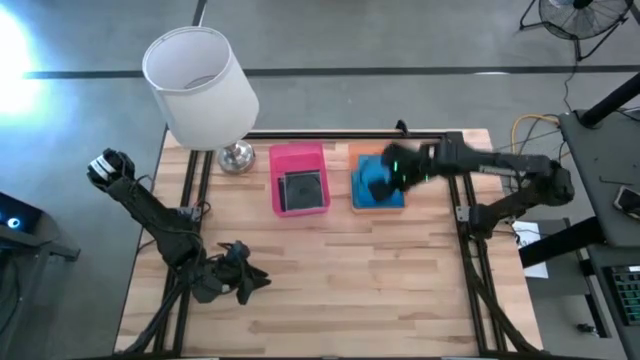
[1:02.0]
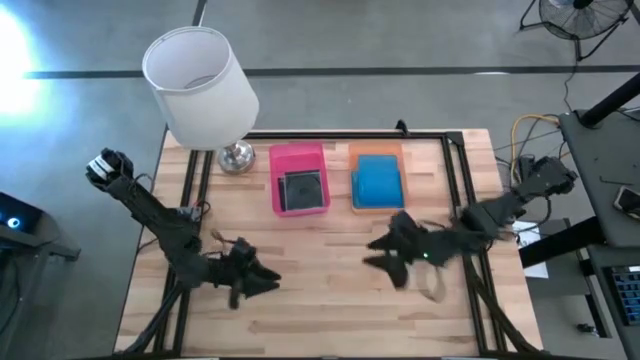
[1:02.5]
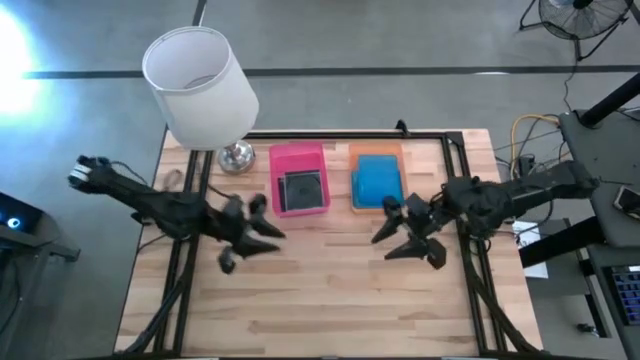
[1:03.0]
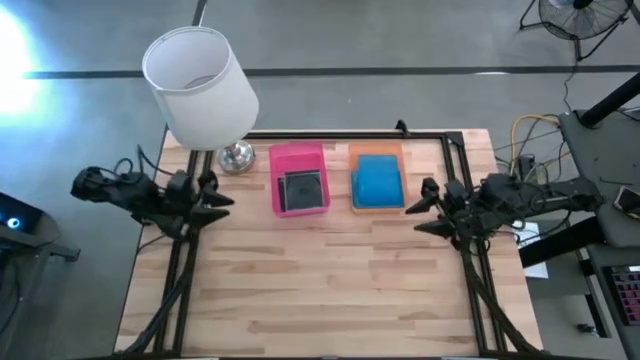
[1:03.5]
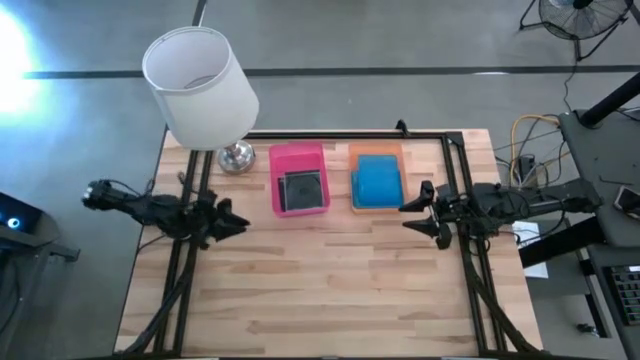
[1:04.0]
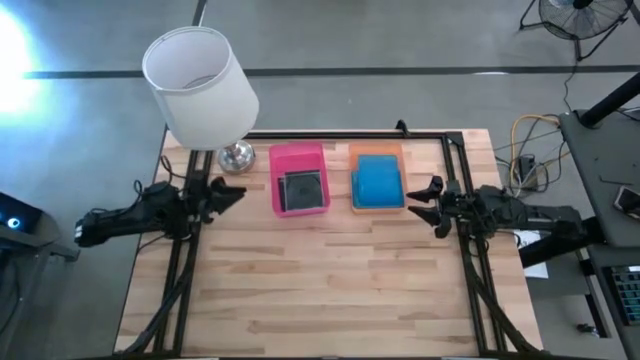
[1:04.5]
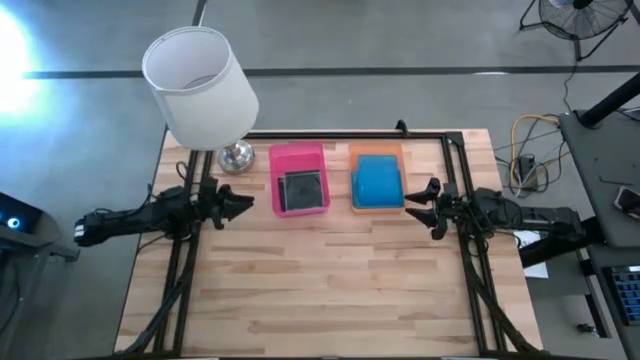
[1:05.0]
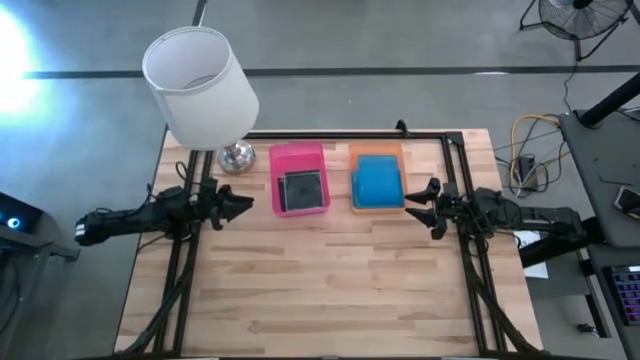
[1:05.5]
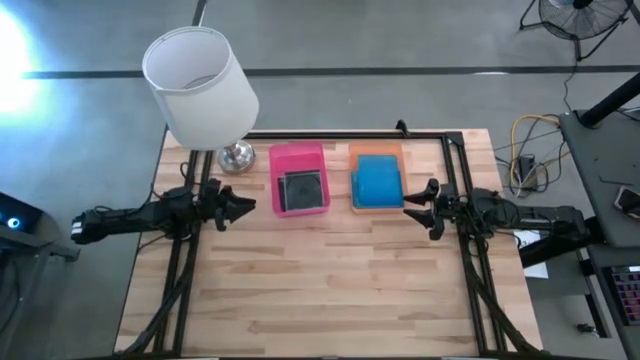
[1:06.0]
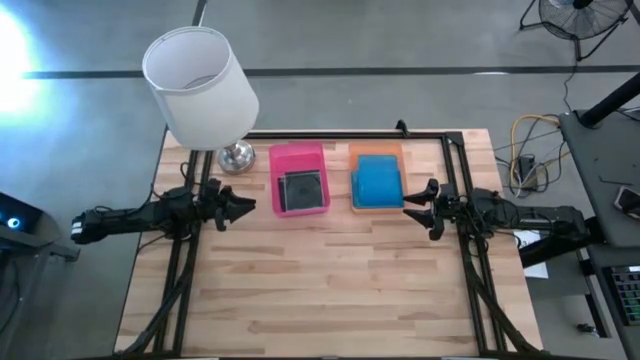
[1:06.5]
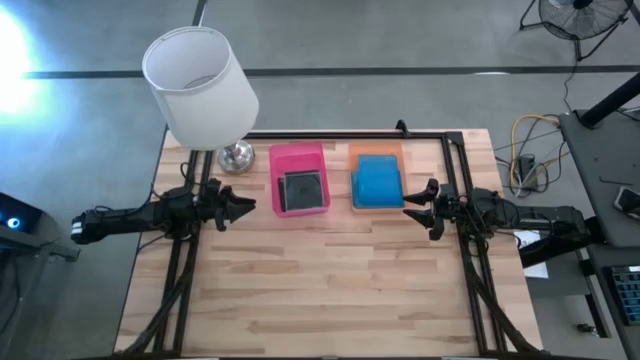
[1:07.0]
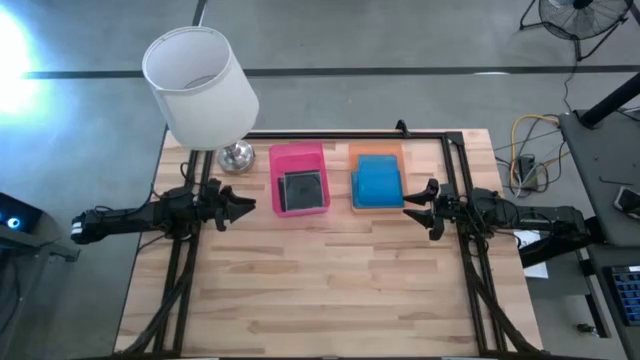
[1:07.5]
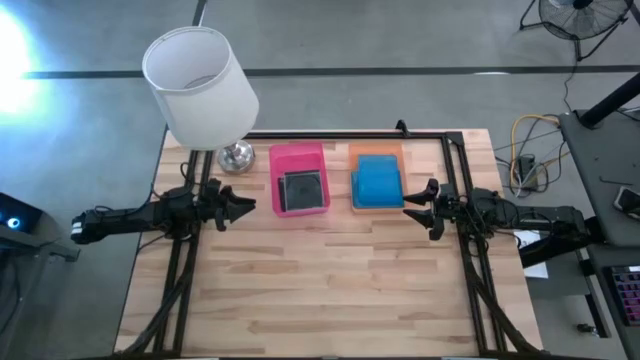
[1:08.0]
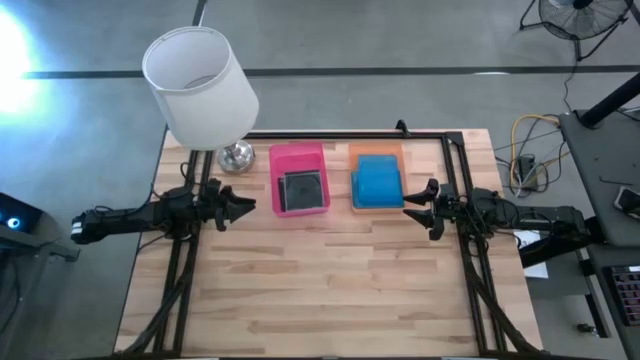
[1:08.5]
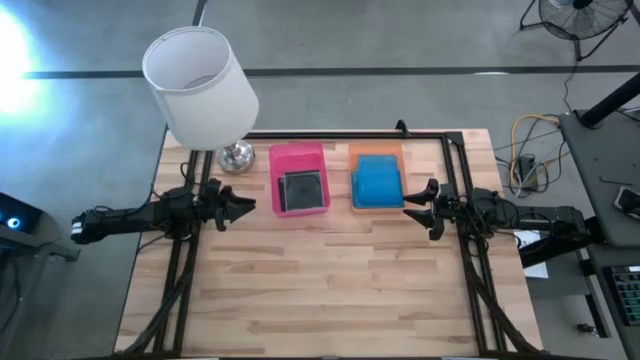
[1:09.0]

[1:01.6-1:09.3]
Task: Pick & place jewel cases by type
Return to home position

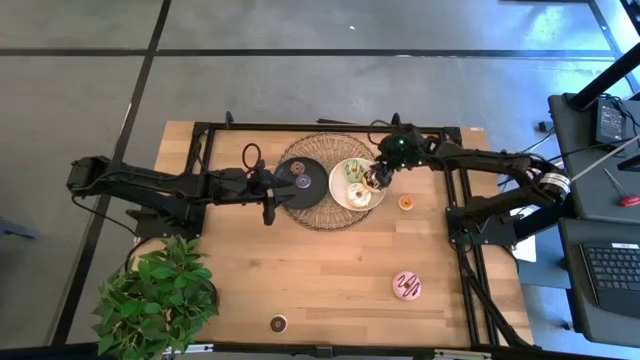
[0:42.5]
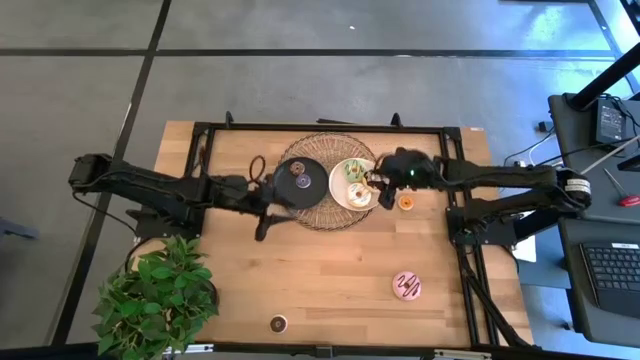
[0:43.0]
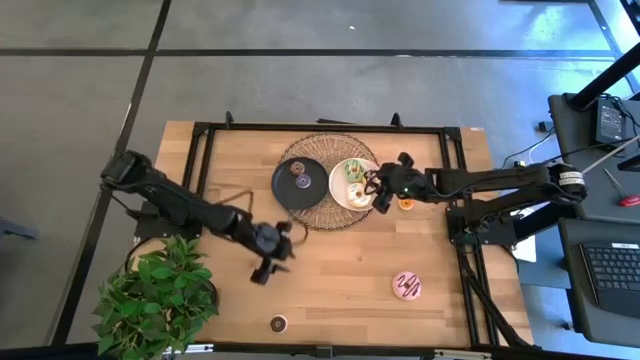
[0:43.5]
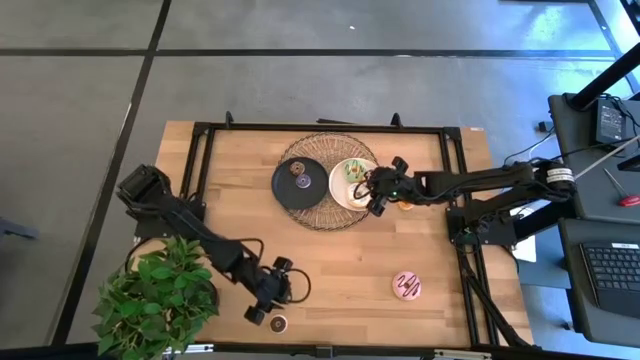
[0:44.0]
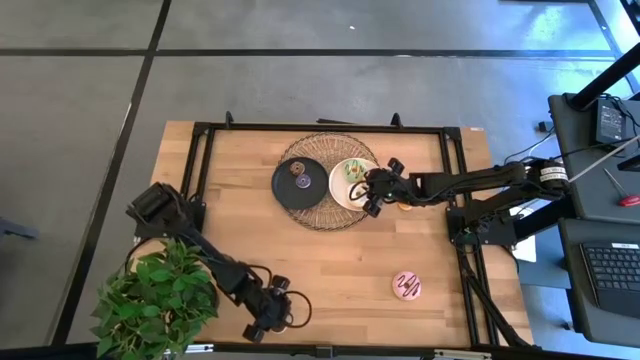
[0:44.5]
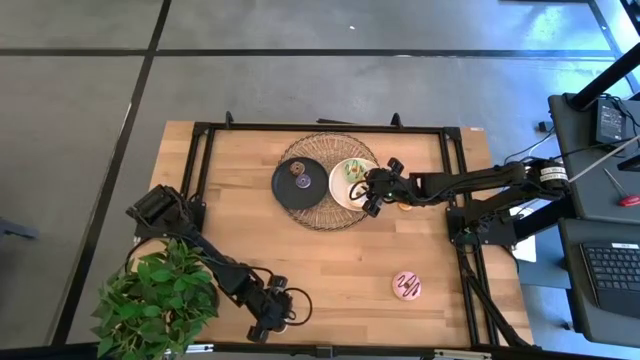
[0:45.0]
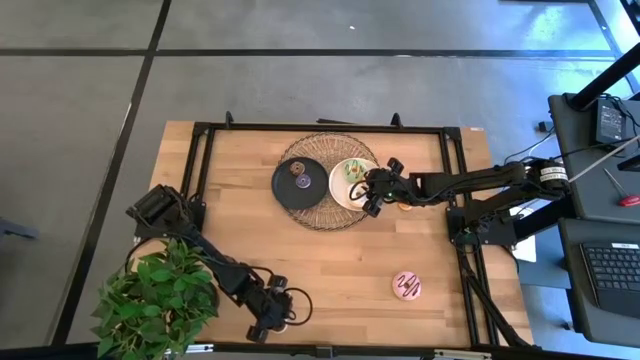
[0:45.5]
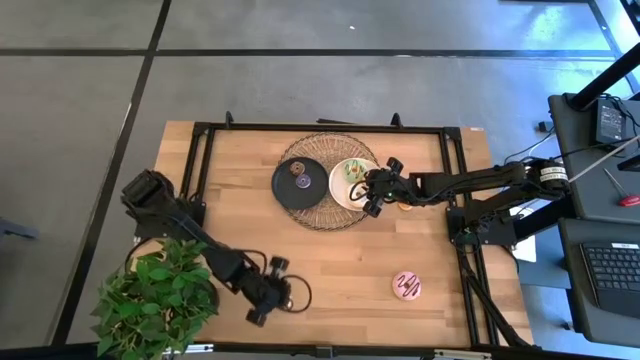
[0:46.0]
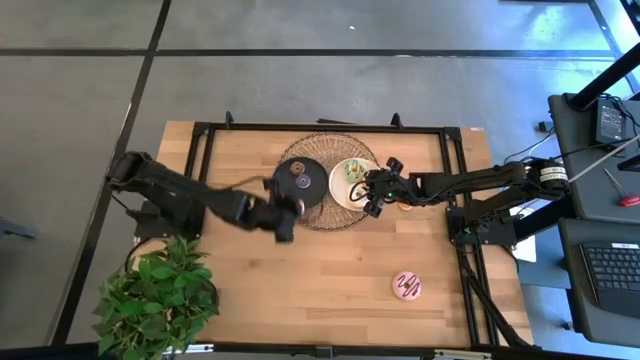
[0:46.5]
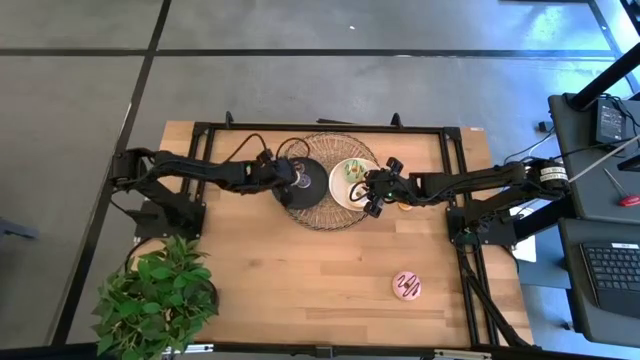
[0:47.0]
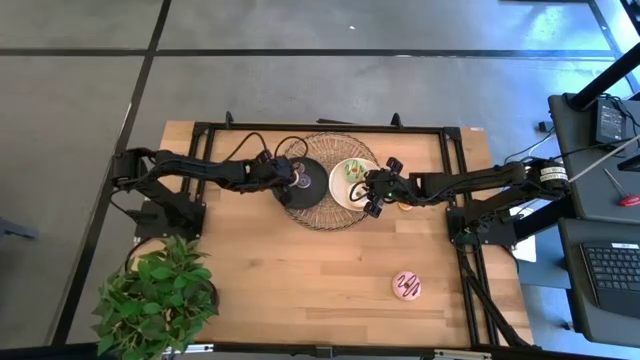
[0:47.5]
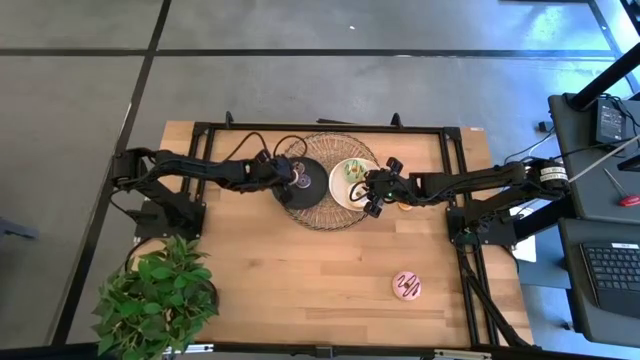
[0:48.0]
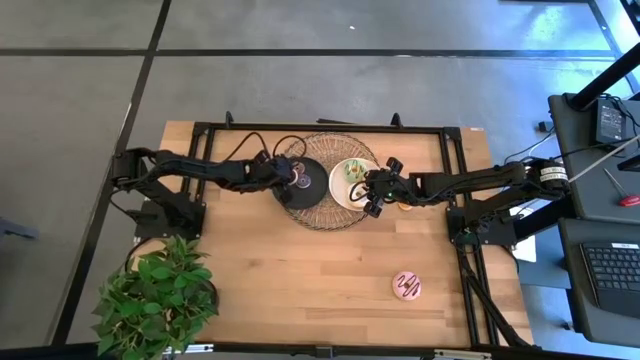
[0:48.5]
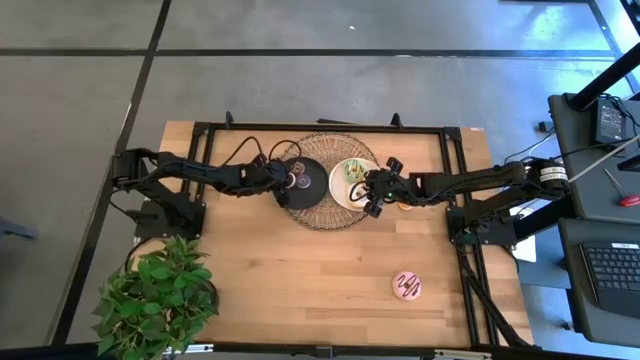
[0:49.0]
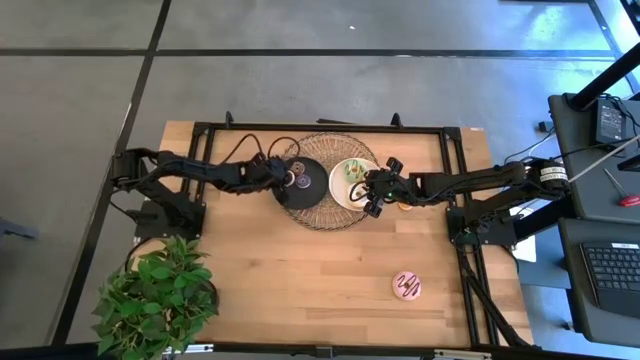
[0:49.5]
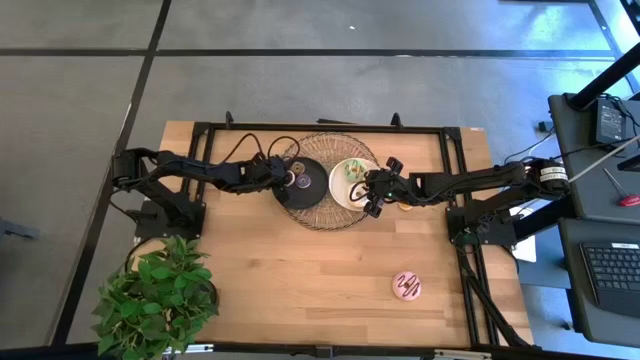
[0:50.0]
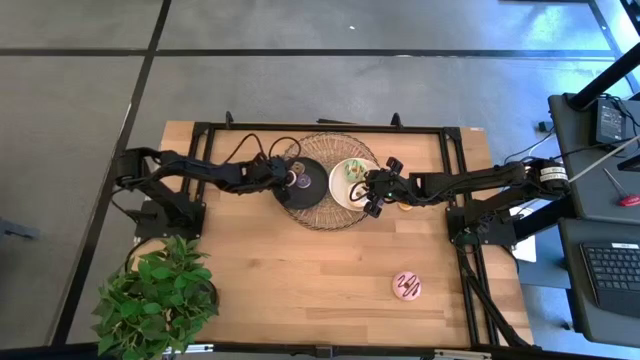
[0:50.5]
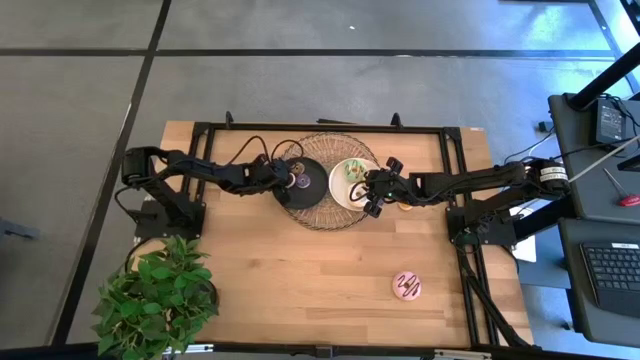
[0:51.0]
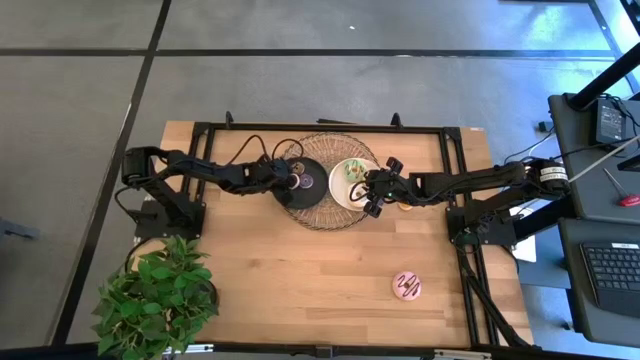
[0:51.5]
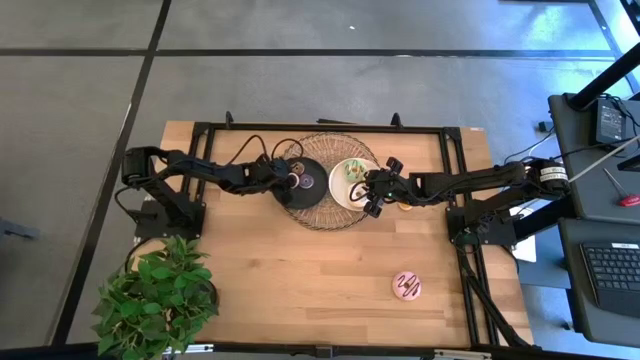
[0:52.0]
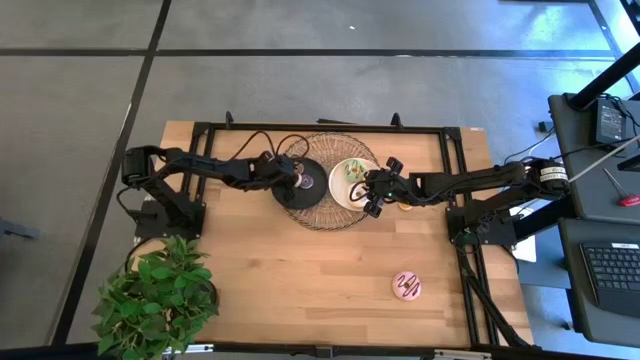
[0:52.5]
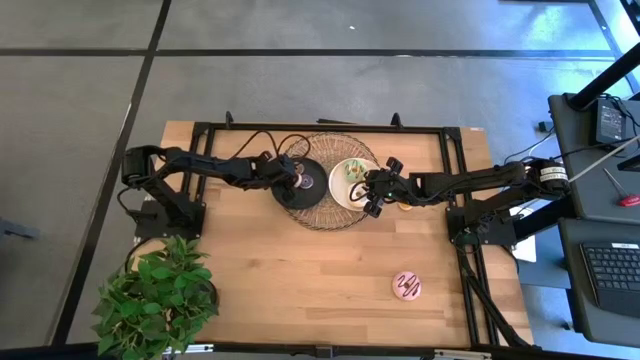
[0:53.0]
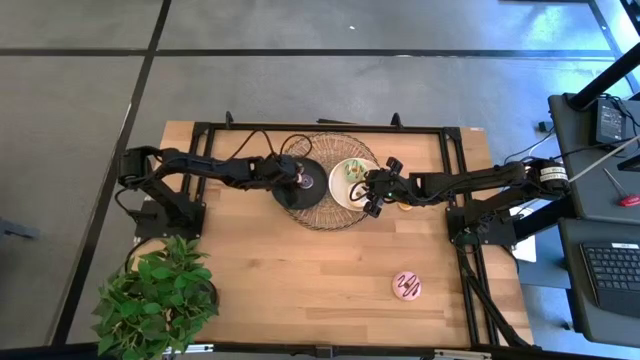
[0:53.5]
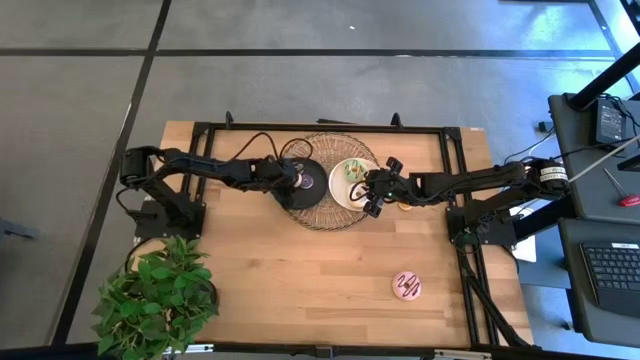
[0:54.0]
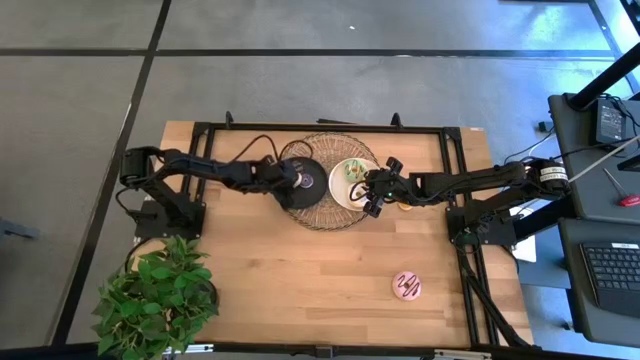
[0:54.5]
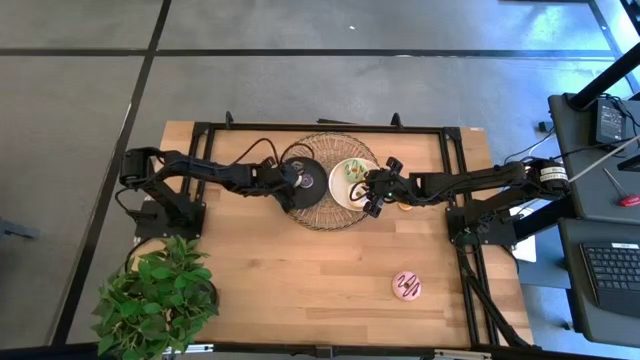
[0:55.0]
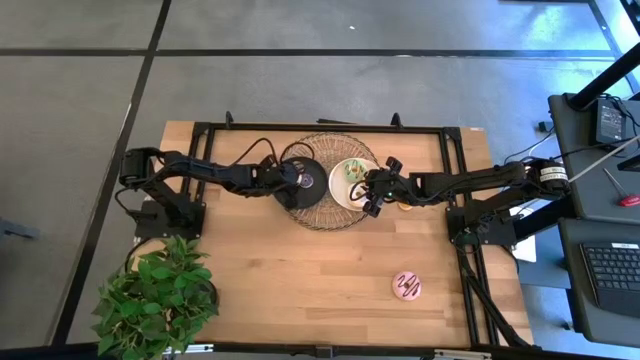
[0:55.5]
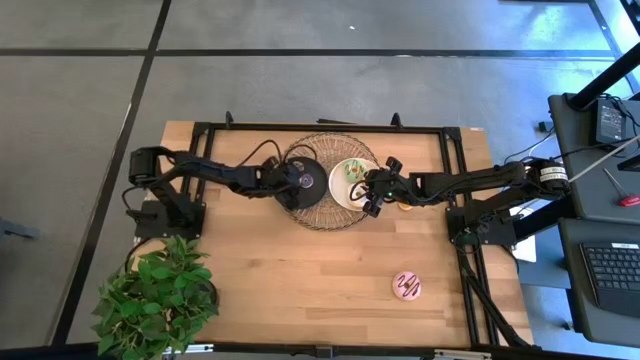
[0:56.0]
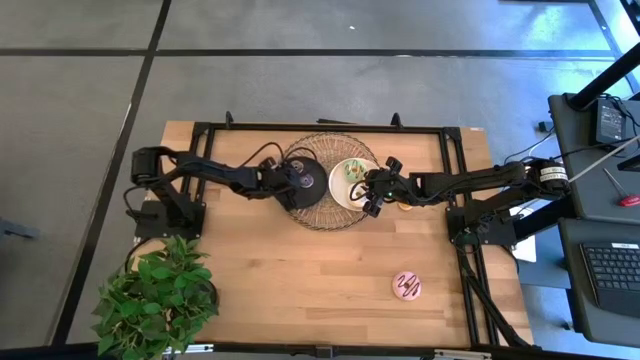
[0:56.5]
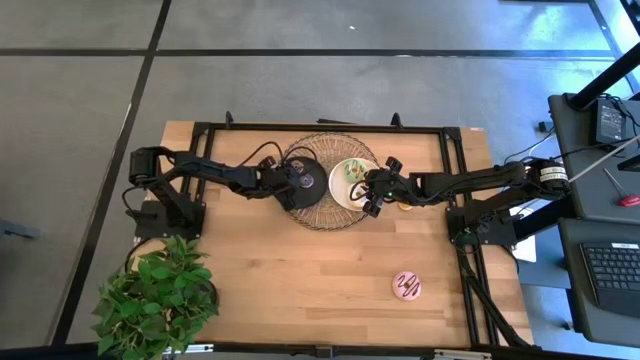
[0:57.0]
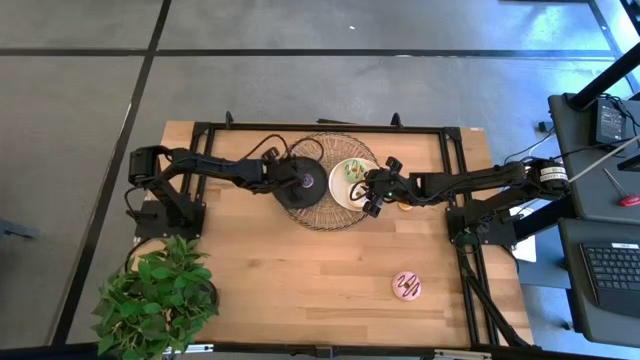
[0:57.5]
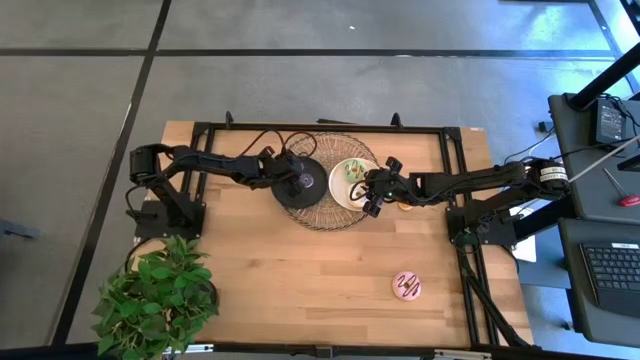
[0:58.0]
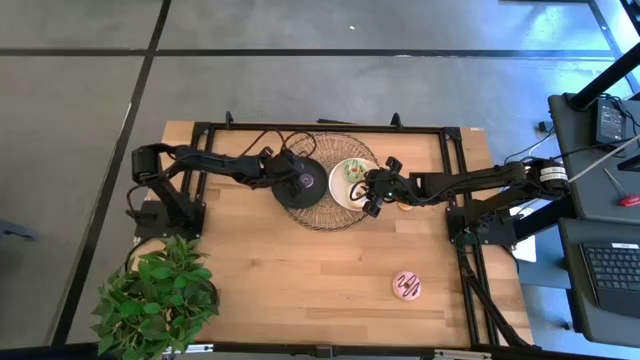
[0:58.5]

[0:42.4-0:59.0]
Task: Pick & Place donuts
Put the small black donut on the black plate
